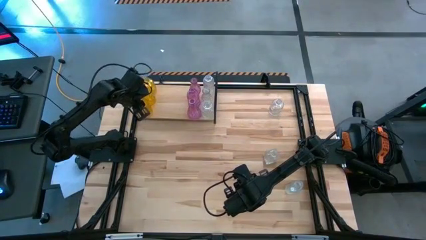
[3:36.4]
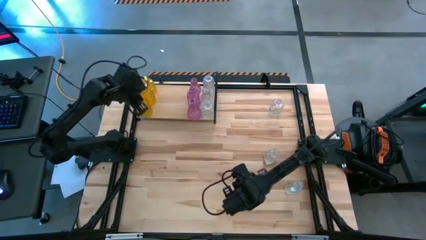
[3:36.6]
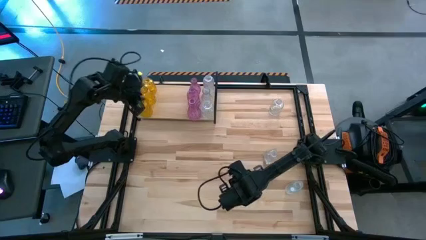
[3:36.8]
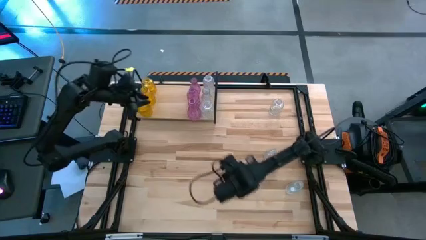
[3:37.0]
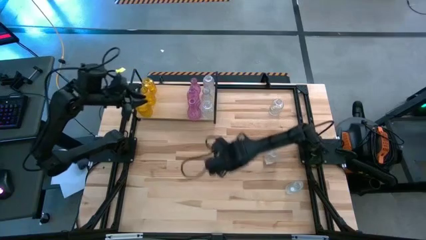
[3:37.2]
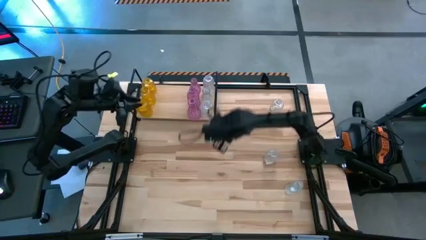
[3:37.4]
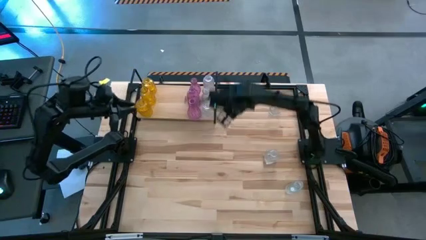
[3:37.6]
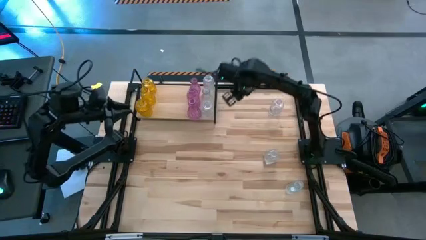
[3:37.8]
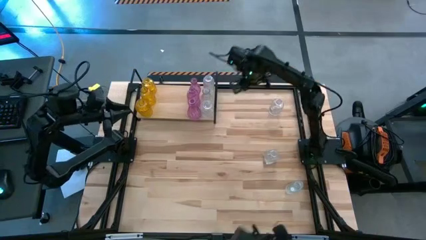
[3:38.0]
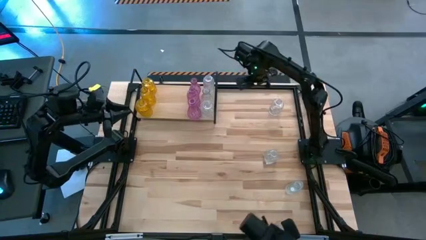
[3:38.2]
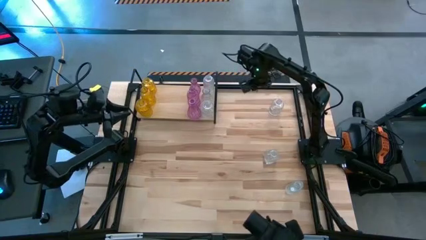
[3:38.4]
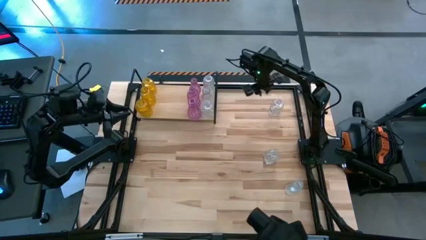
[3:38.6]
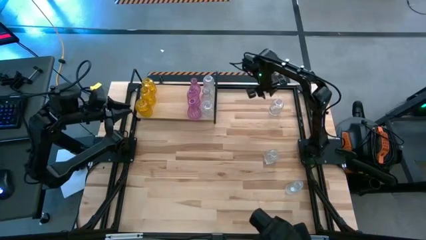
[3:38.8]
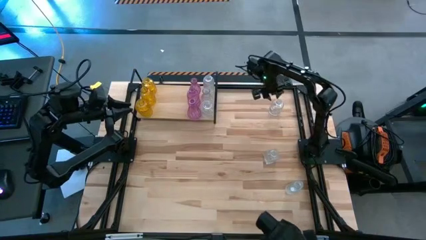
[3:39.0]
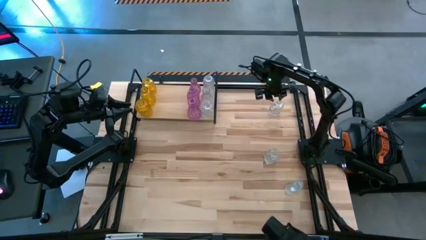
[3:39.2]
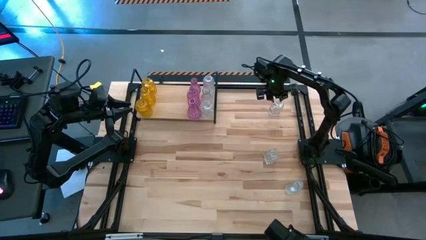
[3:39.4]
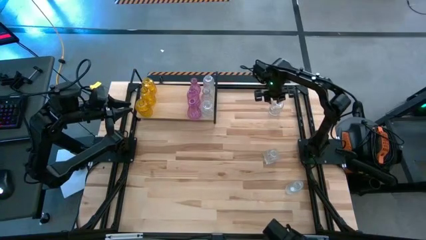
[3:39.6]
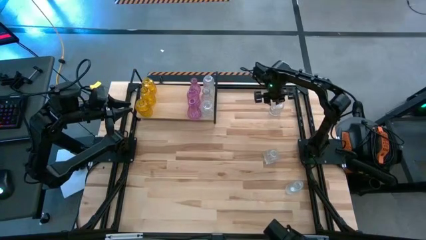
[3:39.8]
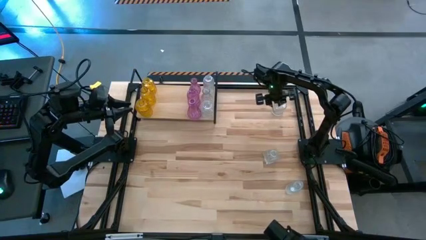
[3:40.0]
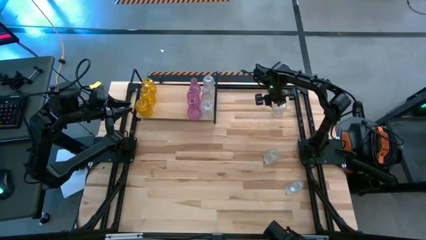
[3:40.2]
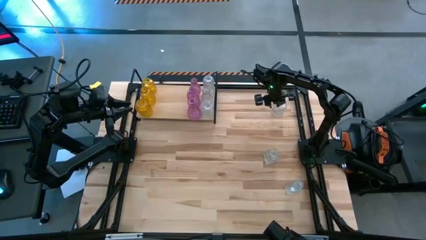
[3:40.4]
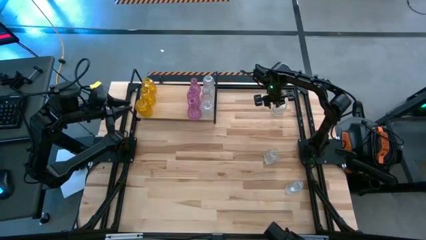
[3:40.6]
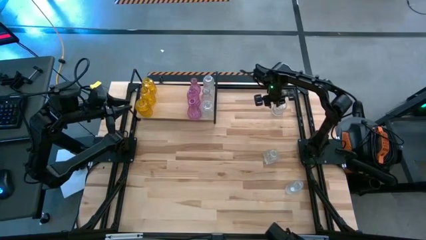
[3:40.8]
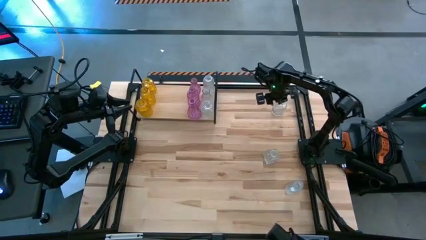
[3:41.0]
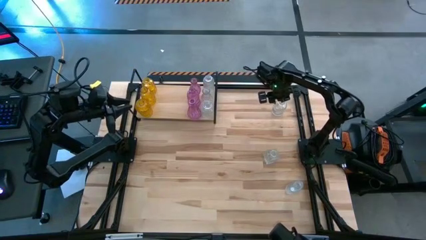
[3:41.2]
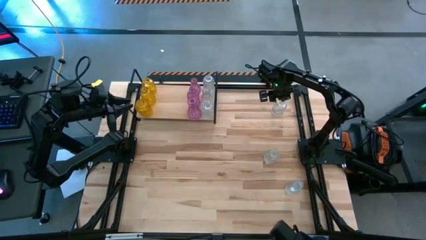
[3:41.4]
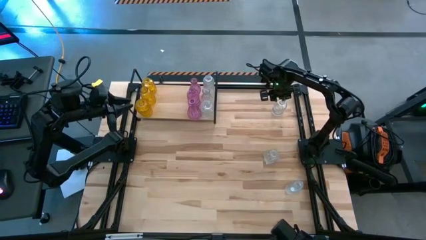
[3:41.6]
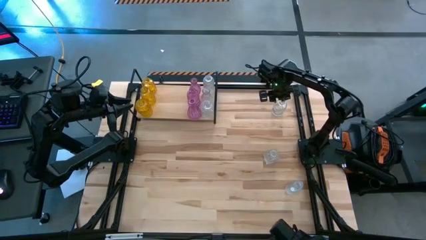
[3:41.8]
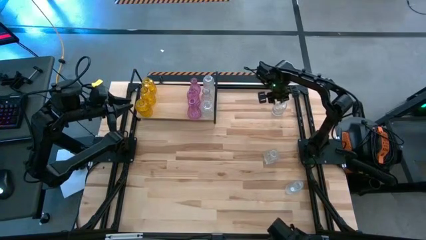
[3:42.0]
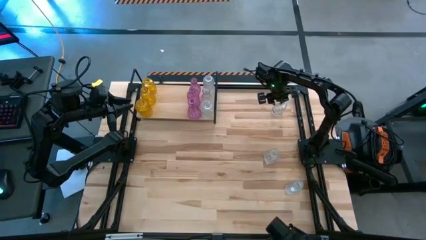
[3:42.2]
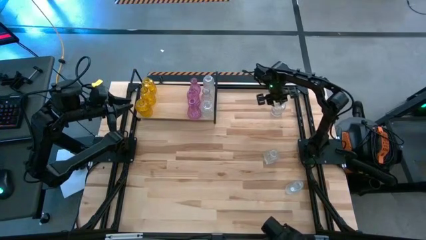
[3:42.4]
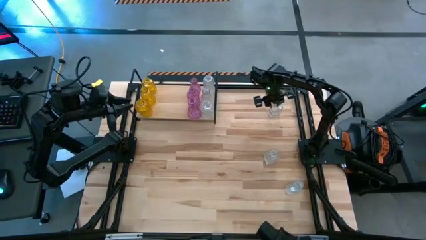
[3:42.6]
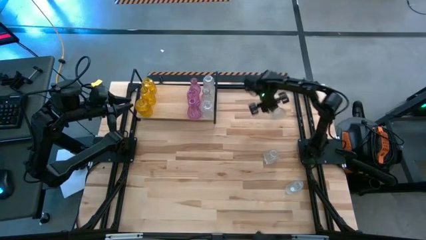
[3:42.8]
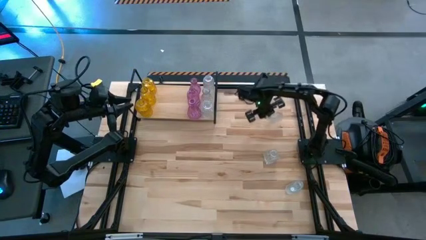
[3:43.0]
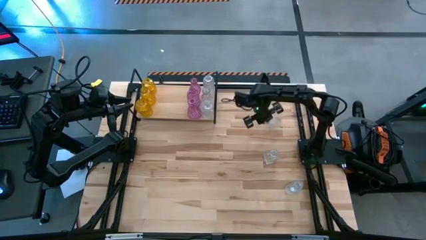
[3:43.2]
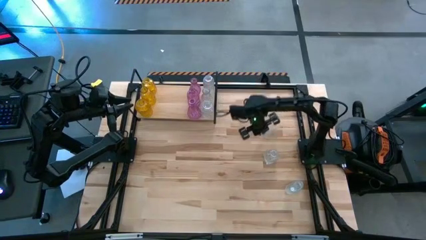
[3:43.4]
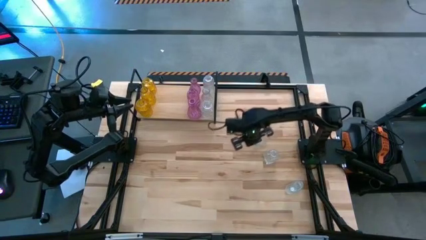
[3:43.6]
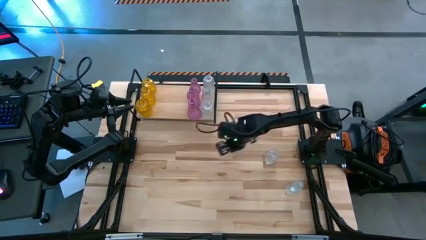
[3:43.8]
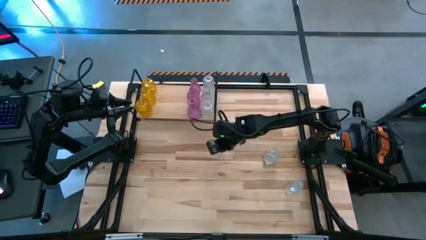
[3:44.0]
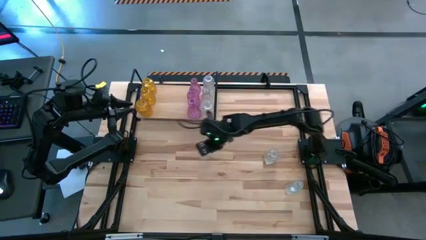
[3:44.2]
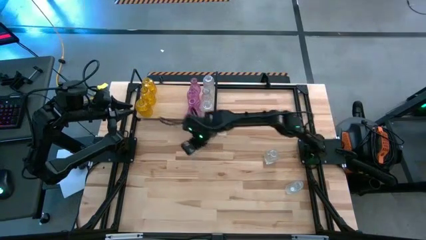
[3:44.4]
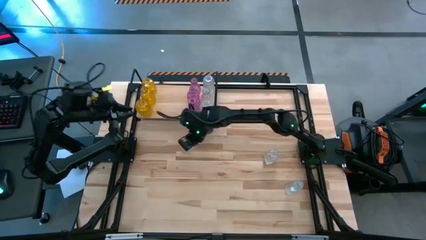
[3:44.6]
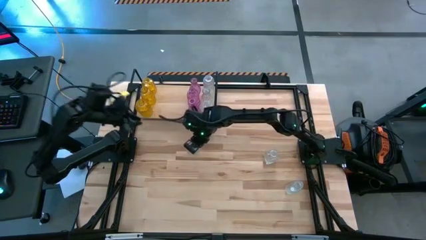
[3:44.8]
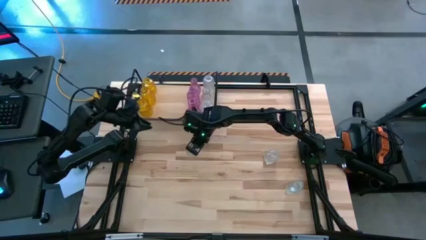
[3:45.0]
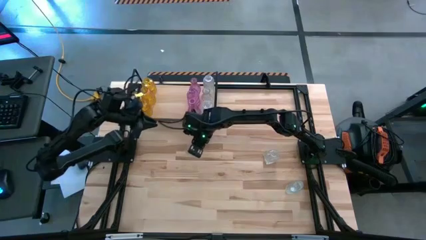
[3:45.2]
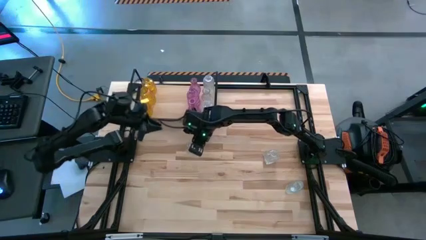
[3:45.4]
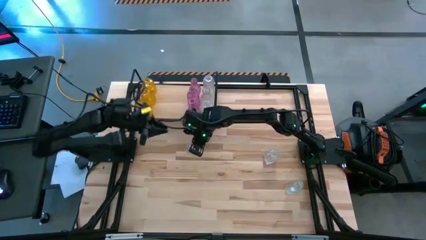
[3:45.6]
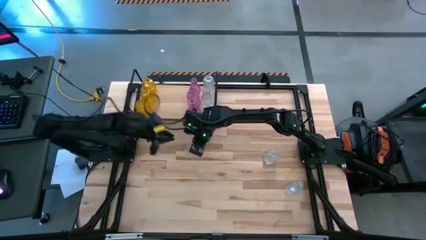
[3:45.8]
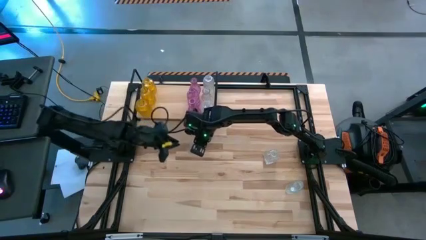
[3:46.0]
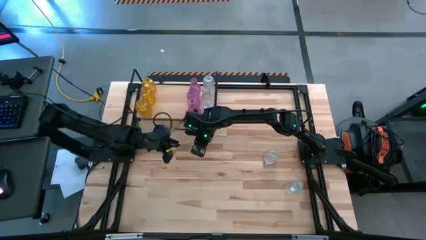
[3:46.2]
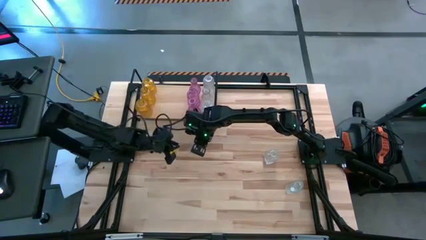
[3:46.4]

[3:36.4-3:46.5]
Task: sort vases onto shelf
Put the transparent vase on the shelf to the left of the top pink vase on the shelf

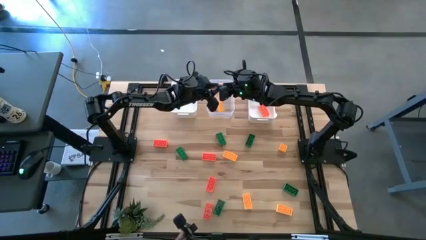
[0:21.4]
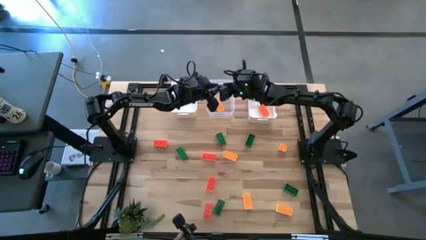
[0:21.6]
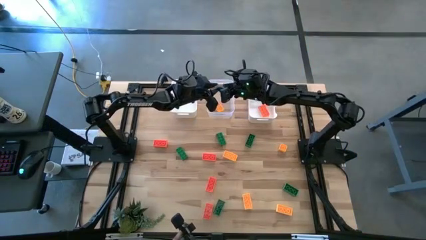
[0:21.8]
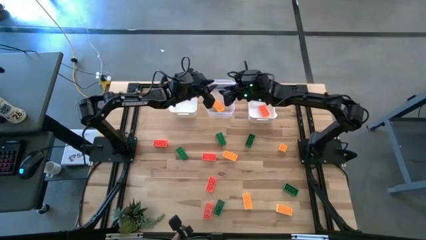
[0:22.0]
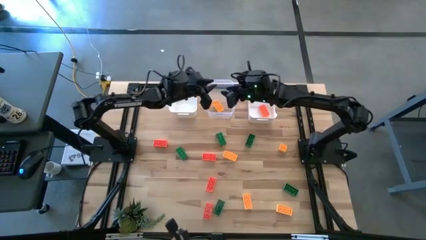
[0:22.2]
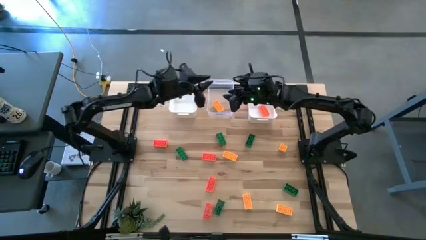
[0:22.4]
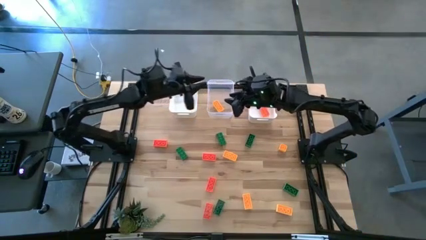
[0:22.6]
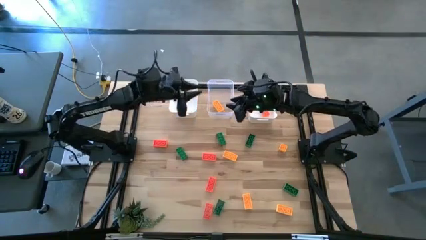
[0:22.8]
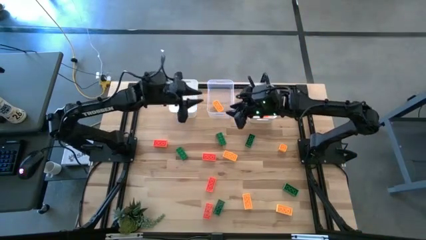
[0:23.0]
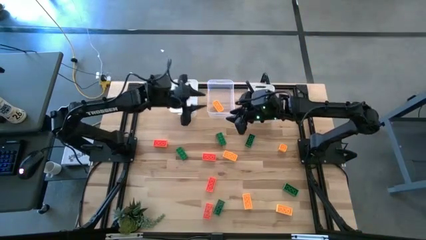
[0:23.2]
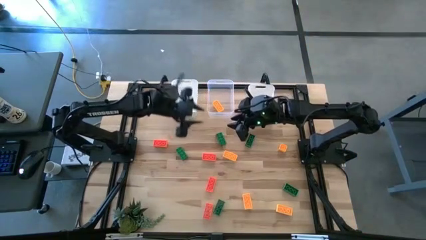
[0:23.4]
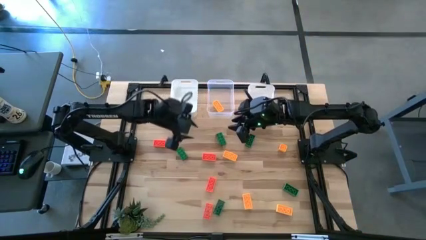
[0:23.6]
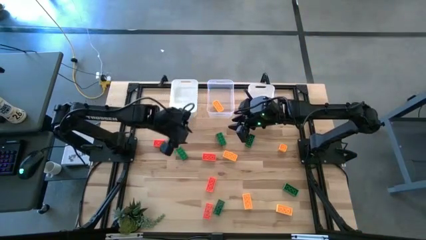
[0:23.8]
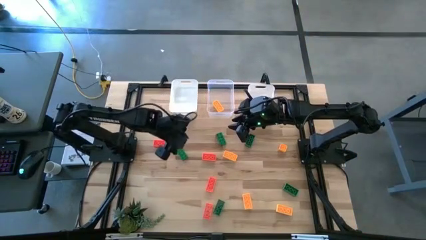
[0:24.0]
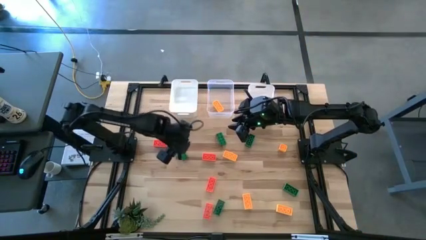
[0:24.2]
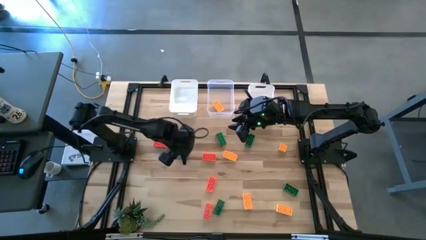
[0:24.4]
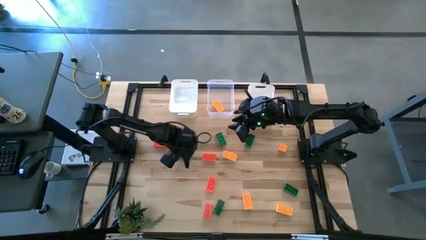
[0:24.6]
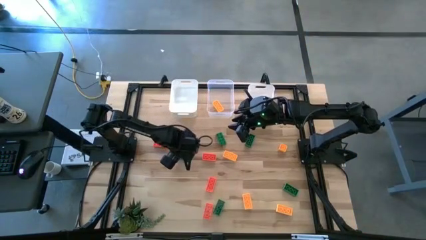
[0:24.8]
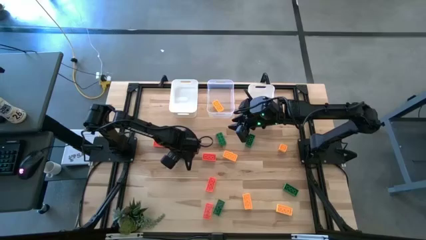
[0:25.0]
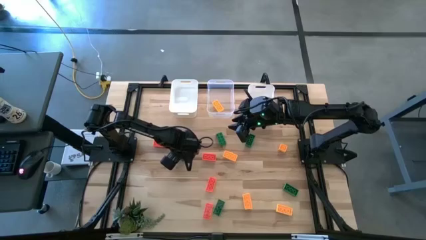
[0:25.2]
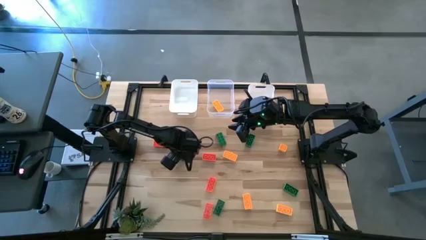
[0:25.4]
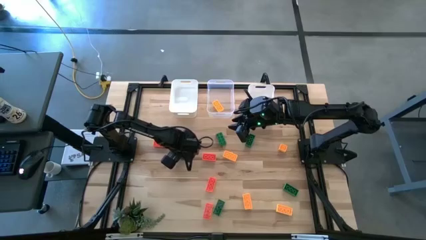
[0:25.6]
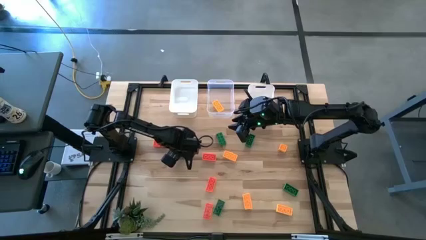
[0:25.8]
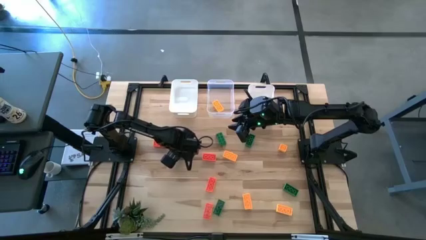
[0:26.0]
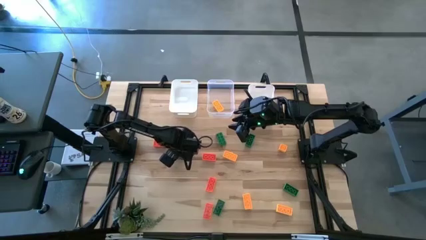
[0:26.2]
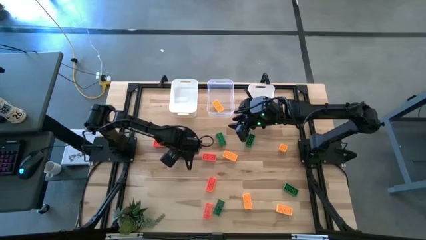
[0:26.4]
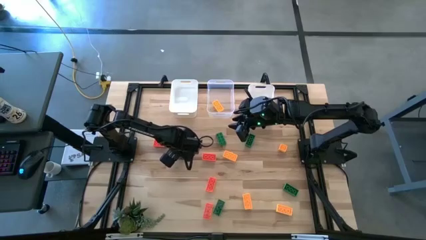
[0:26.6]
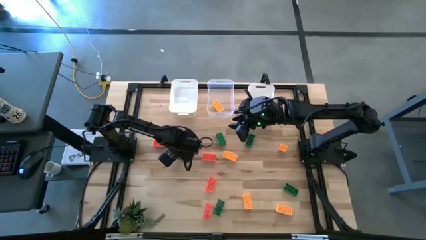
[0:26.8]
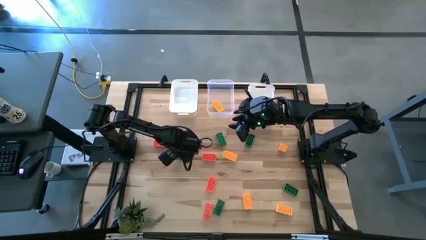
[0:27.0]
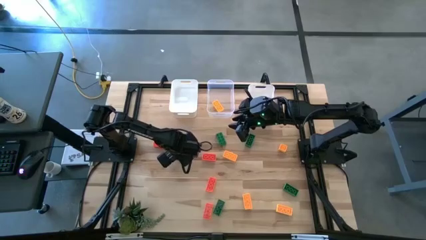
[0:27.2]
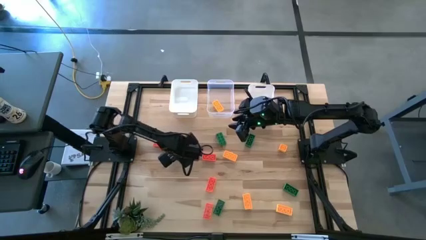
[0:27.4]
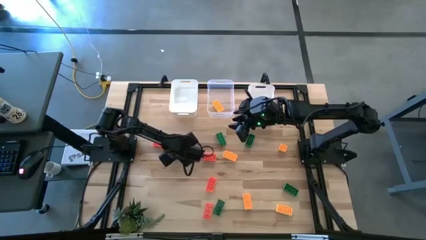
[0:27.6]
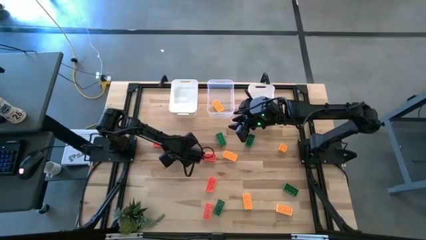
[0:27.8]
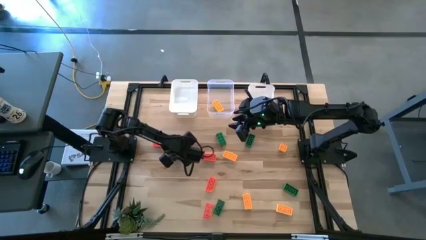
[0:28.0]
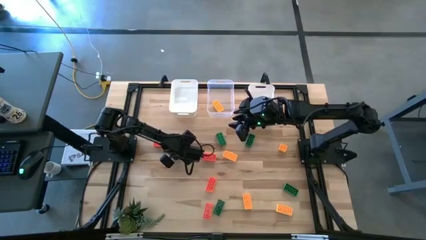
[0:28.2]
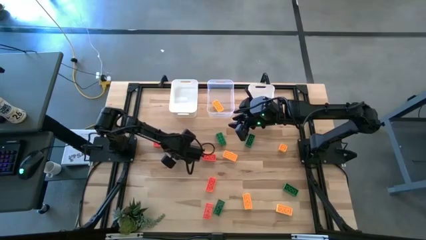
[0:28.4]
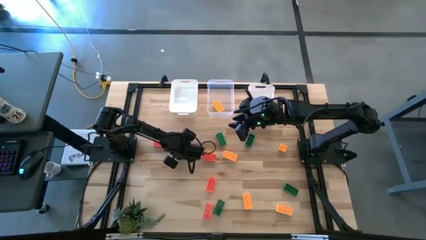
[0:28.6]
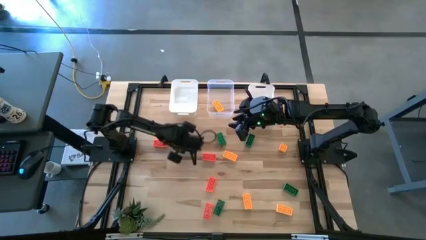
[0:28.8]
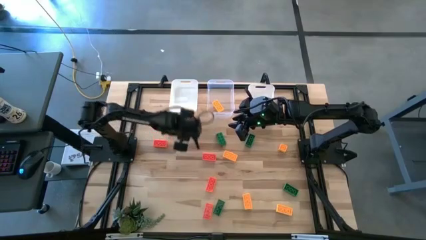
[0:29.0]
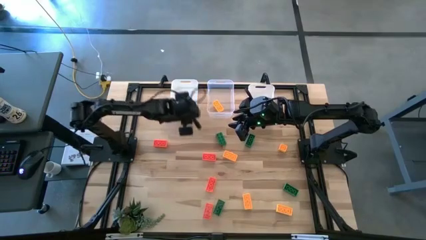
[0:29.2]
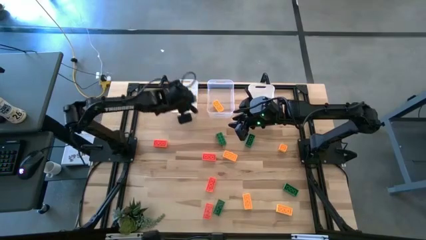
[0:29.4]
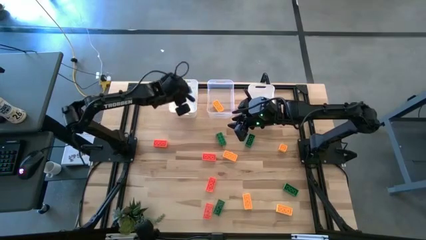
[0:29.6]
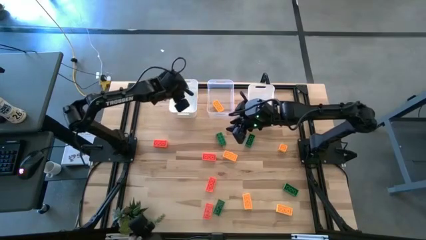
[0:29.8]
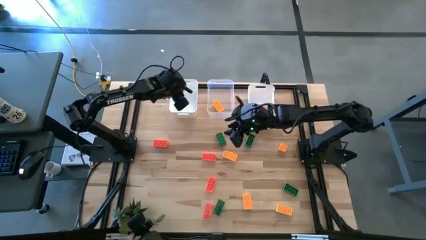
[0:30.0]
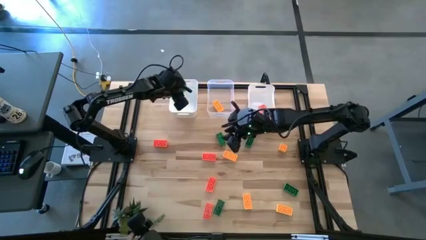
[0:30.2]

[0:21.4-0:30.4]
Task: Sort & place blocks by color
Put the green game piece into the left white bin
